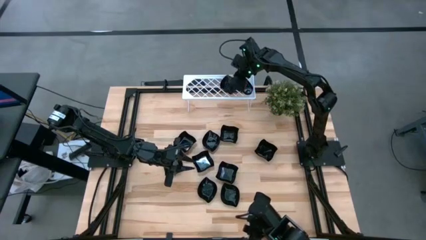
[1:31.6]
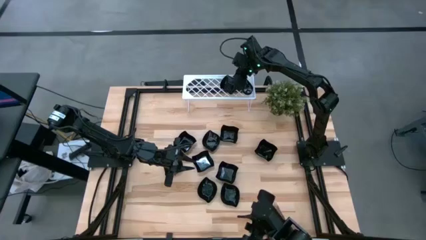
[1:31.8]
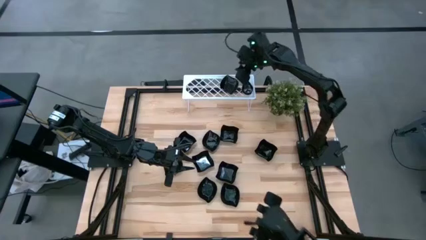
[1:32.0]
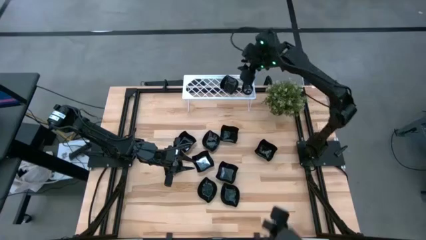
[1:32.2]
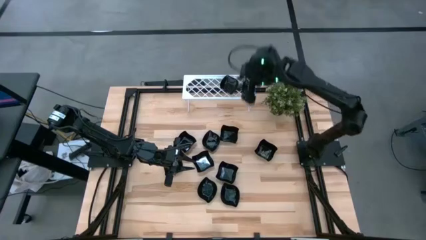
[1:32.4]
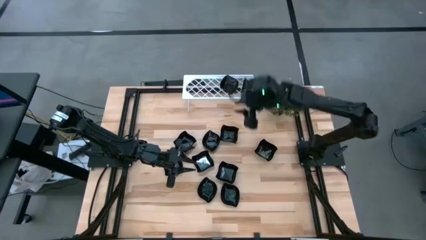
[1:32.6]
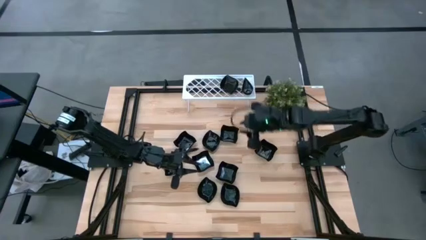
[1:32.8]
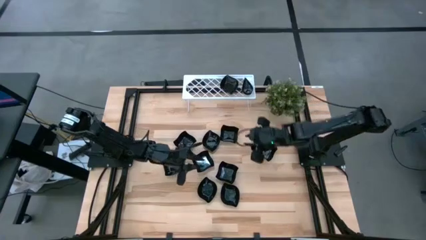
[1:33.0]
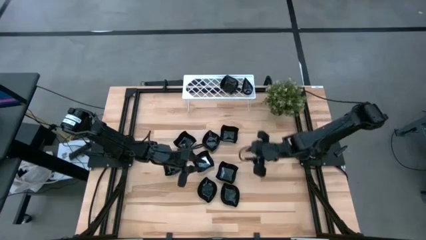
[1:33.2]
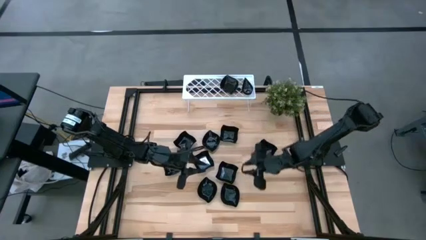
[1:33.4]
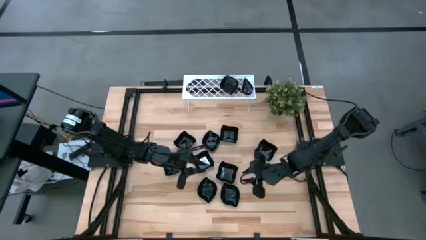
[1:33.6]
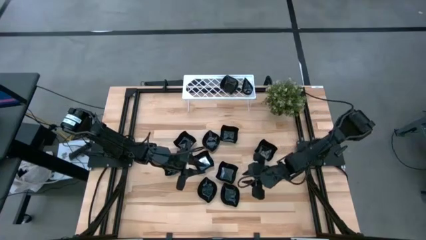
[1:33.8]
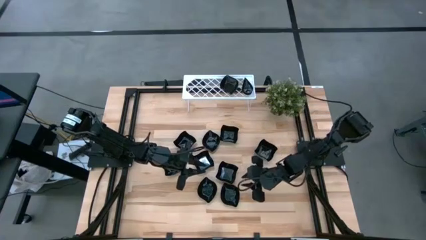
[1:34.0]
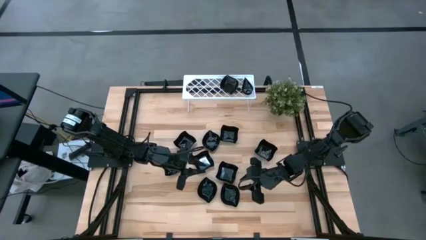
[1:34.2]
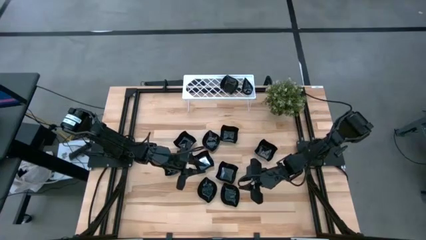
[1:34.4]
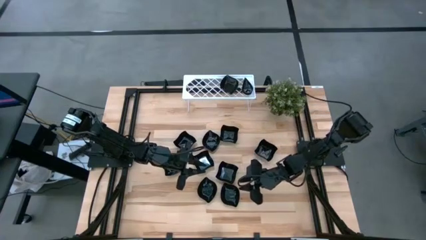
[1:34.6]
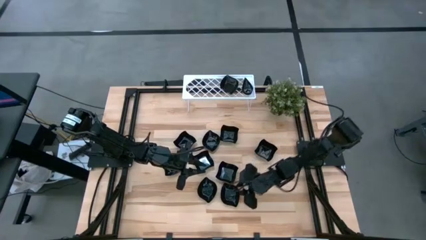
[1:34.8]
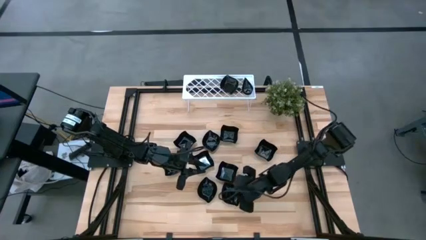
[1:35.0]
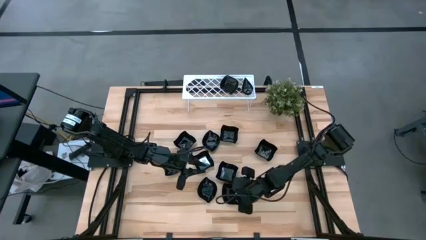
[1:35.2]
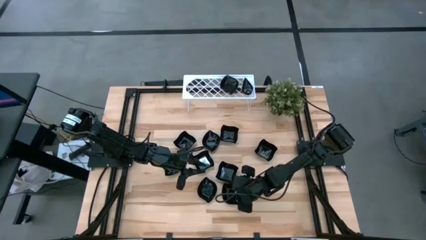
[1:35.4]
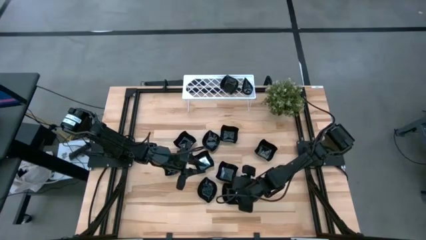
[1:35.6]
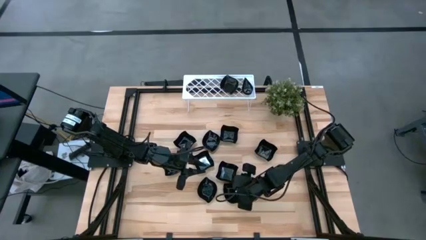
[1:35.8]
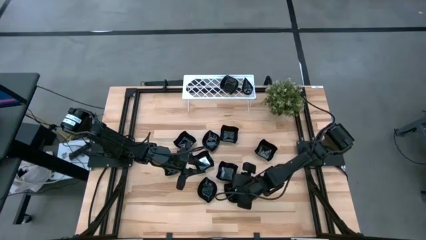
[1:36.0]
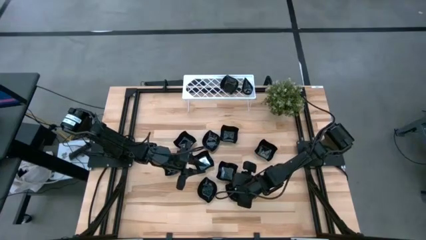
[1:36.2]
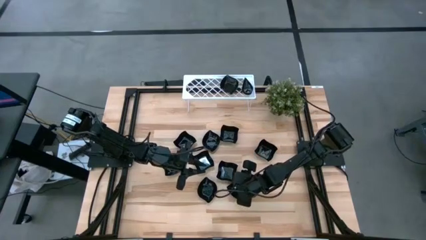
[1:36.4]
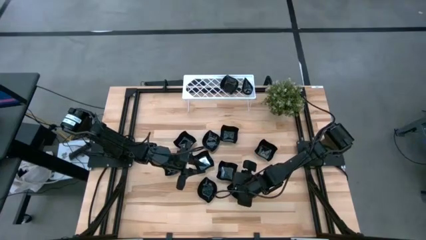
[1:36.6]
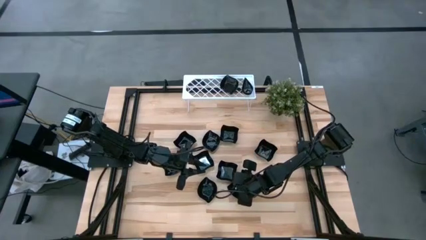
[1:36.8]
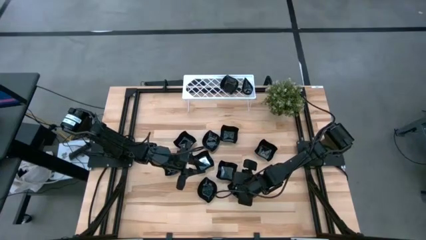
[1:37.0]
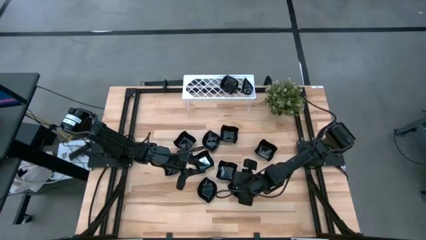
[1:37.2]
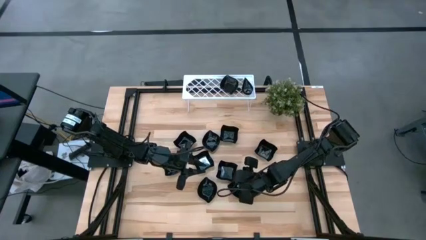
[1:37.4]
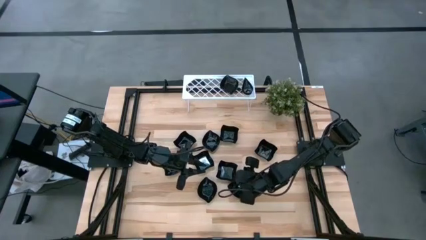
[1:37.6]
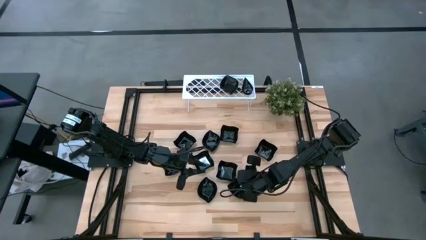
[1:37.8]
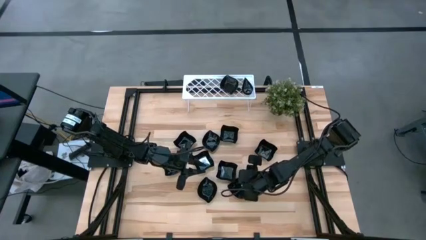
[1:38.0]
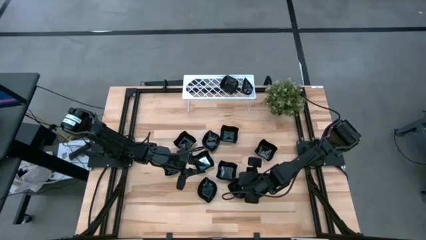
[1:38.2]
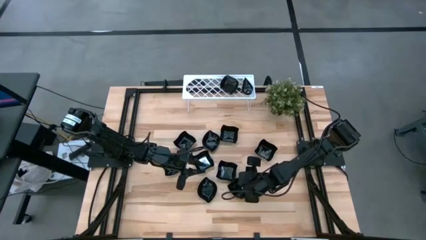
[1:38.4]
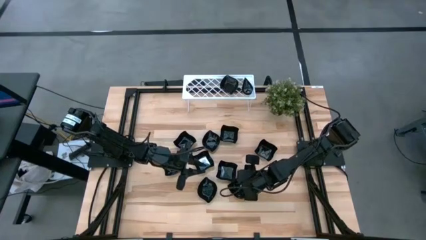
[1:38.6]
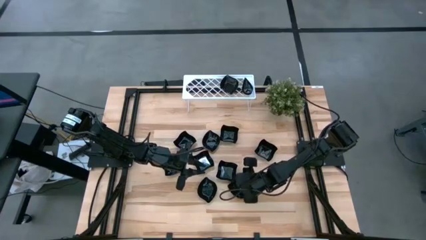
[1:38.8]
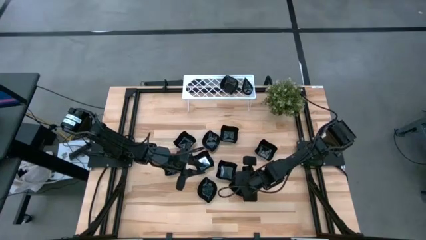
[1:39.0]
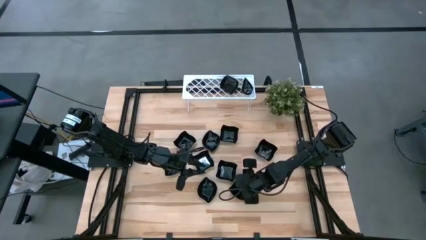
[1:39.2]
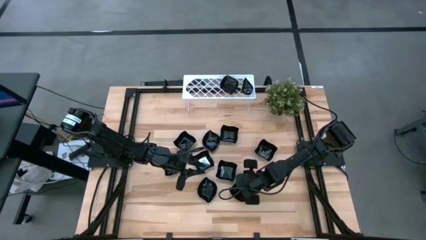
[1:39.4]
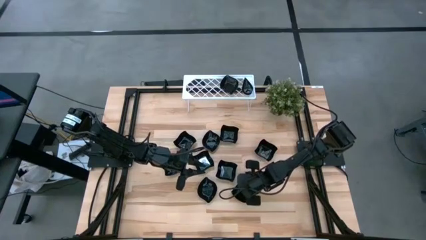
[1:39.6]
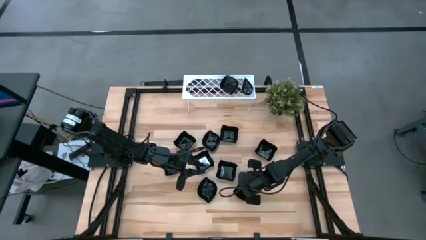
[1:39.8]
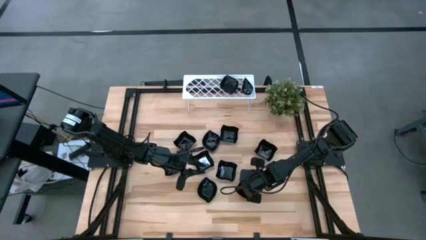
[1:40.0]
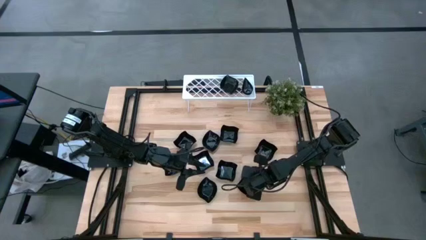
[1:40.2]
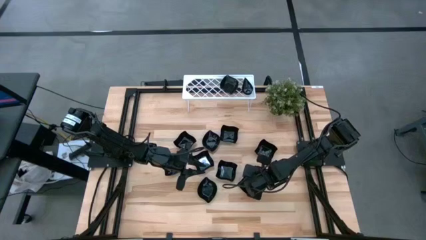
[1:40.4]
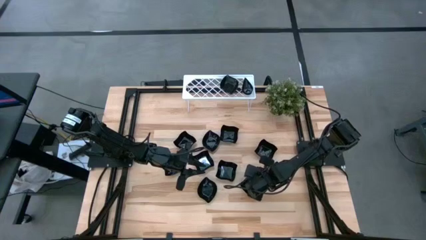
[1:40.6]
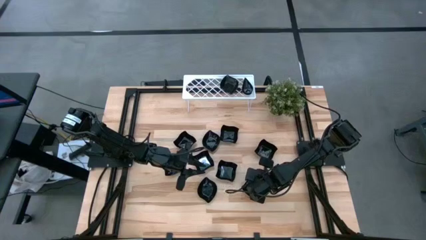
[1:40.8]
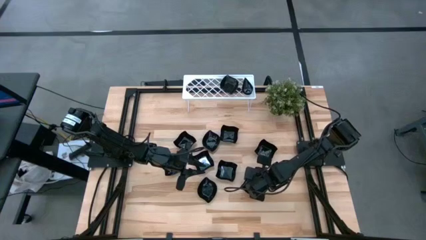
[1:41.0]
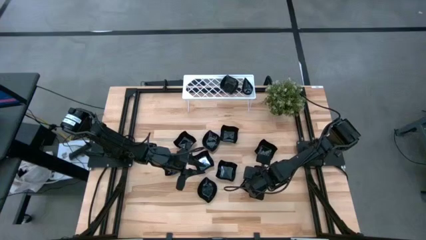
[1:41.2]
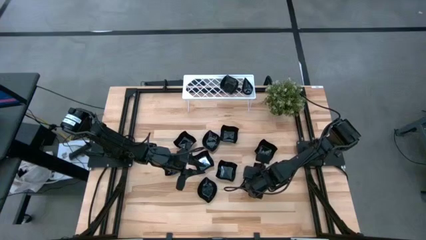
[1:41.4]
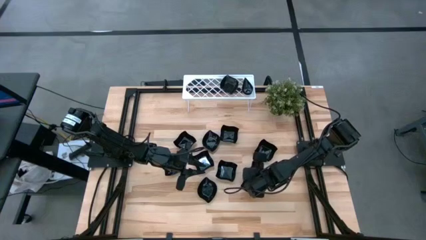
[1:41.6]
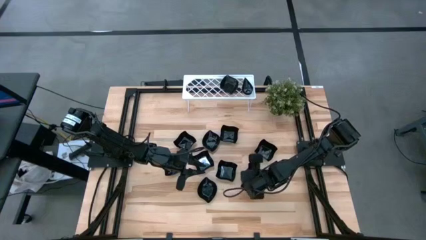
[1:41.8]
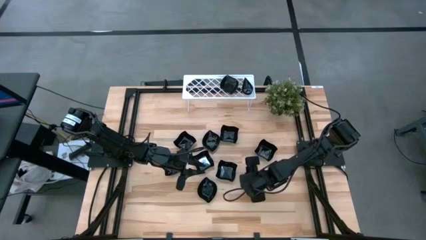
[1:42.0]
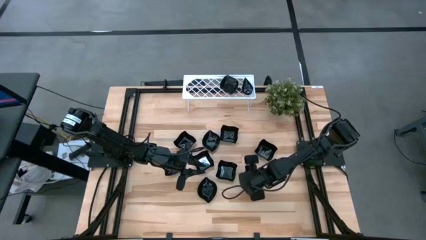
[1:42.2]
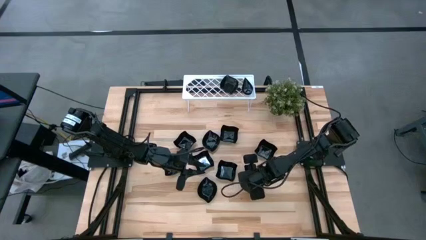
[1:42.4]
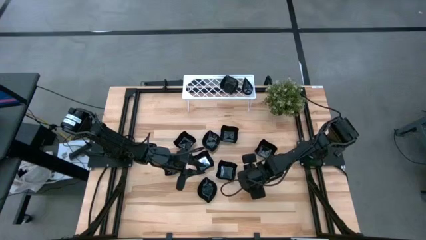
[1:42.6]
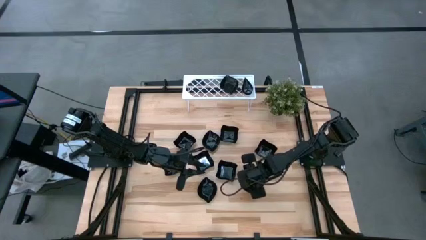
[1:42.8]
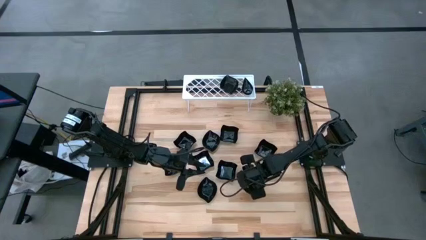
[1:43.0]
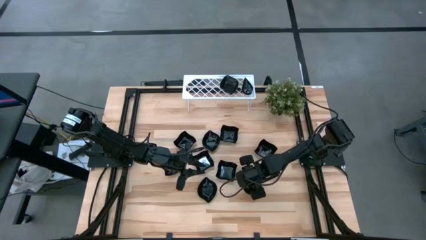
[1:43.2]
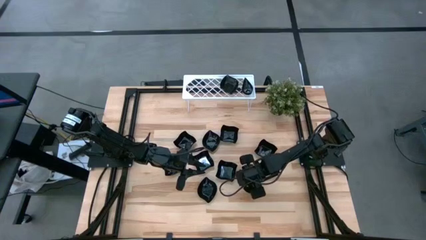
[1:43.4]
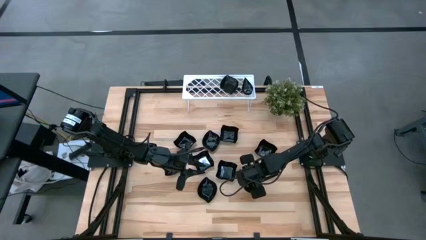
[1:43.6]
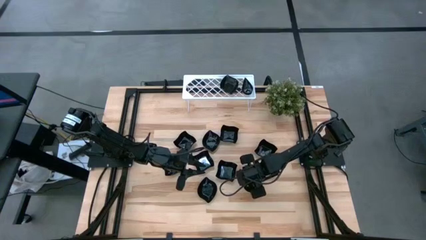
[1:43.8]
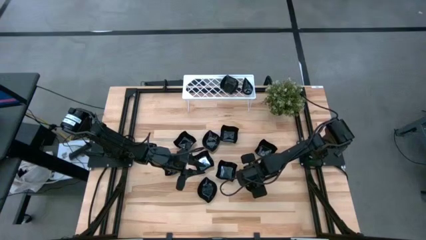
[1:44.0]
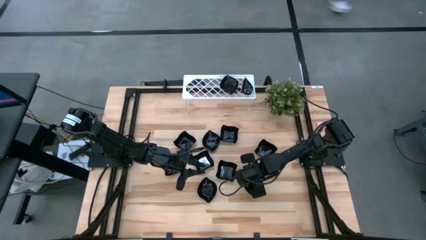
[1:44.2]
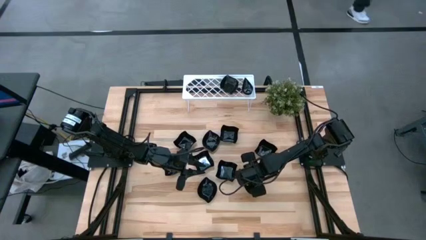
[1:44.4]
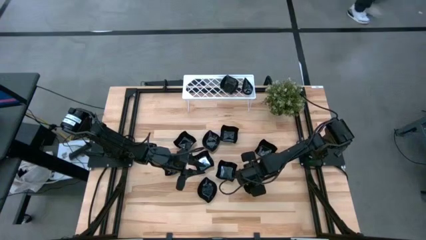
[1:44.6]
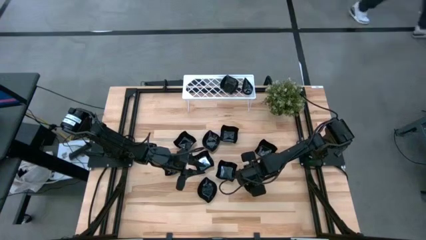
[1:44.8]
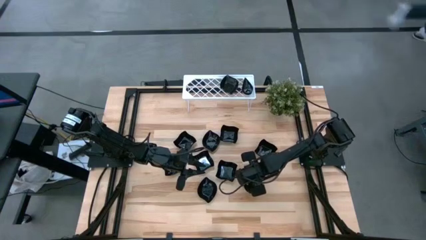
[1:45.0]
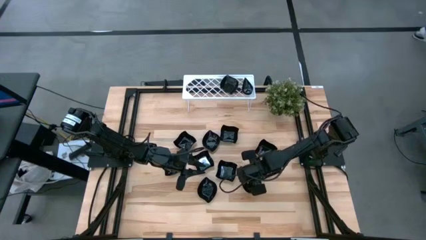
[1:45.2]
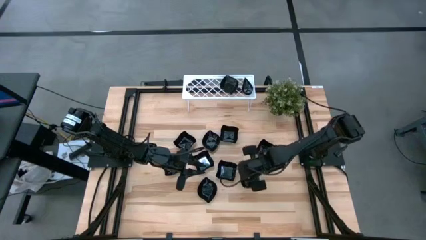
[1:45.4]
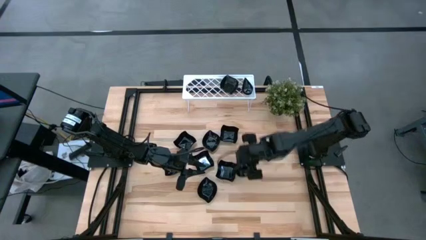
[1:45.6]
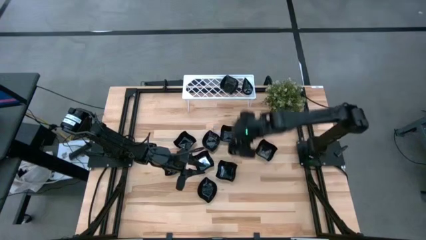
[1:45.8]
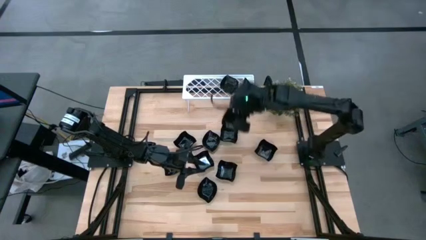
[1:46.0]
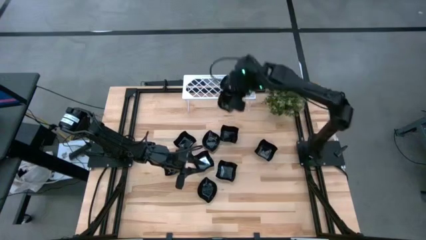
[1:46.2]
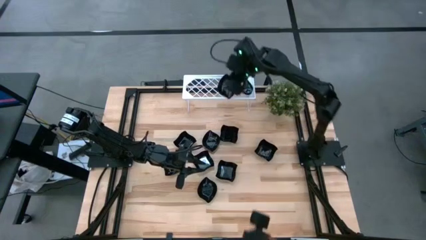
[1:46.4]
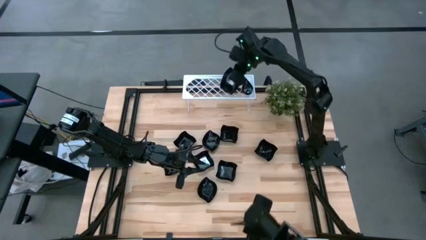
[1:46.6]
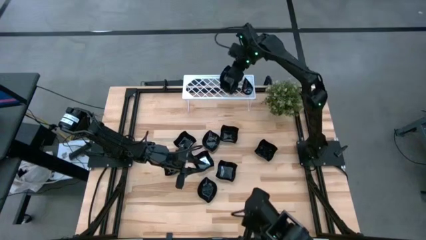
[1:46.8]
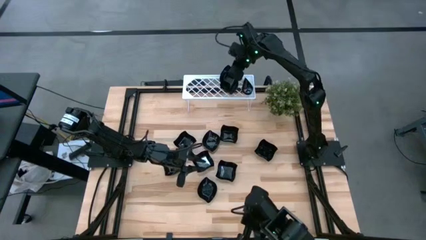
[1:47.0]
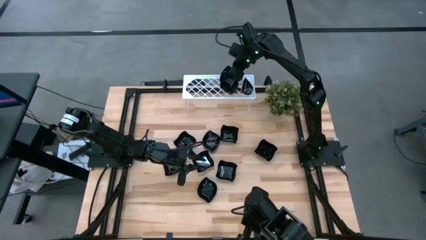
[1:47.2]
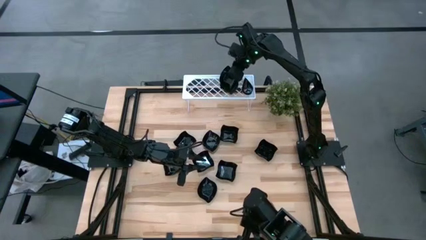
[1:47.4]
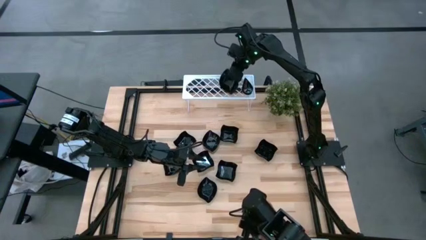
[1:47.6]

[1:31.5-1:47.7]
Task: Pick & Place Mini shaped plates
Stack the leaf shaped plate on top of the leaf shaped plate on the shelf

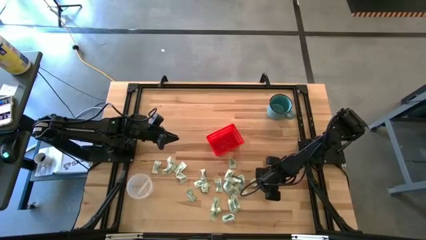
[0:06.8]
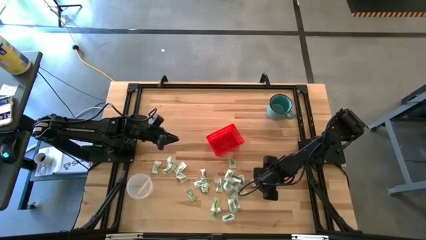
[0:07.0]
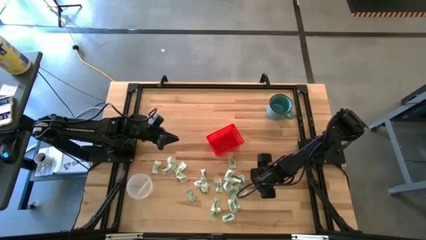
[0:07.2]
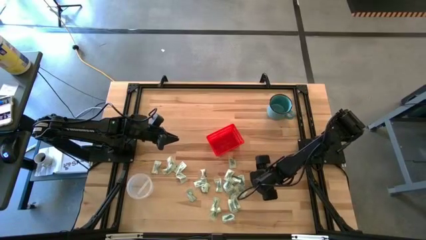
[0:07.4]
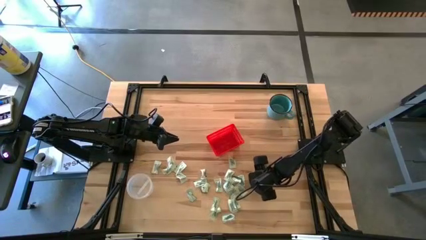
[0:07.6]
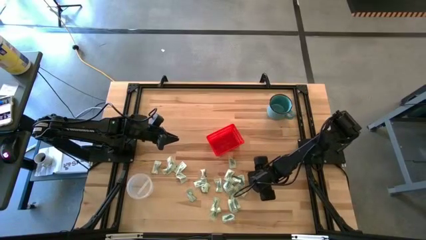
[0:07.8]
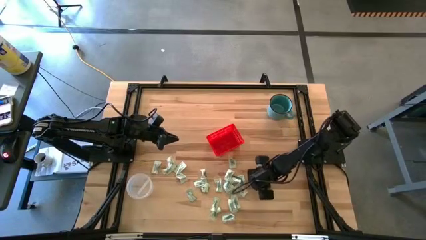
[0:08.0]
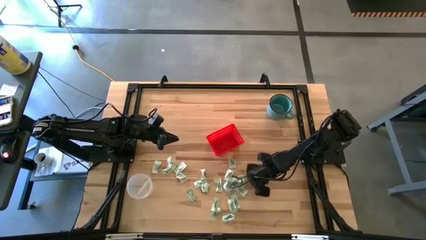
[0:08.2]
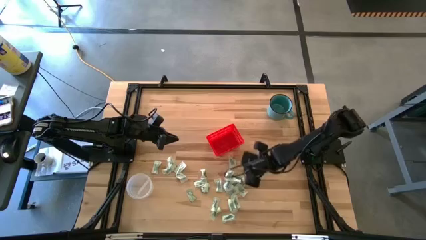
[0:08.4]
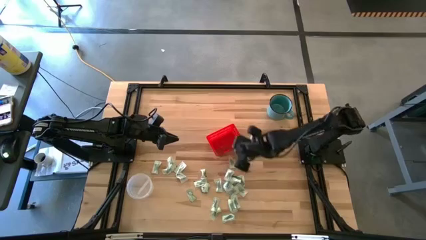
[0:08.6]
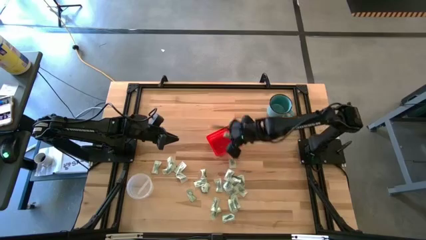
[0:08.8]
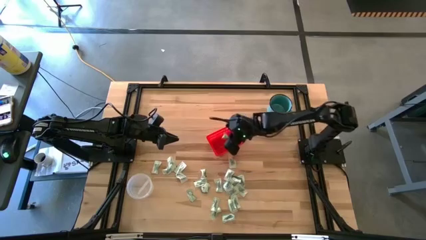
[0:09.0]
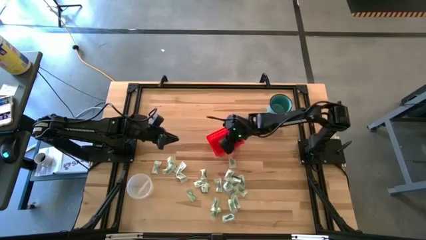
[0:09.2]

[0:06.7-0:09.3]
Task: Pick and place items into bin
Put the stevia packet into the red bin
